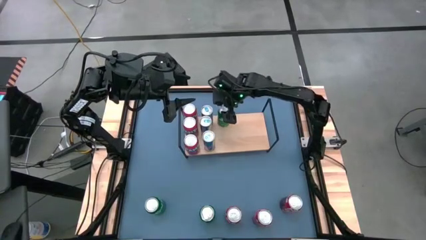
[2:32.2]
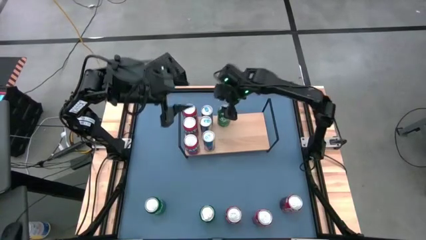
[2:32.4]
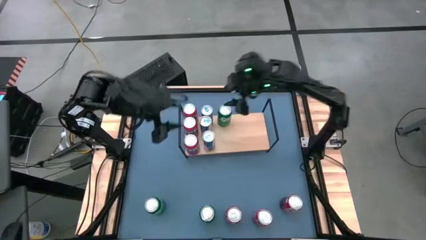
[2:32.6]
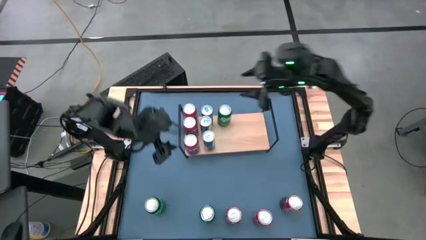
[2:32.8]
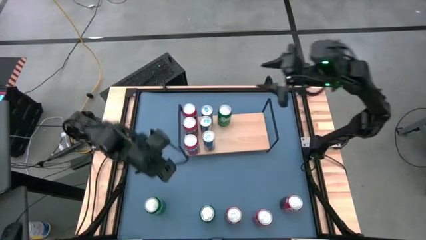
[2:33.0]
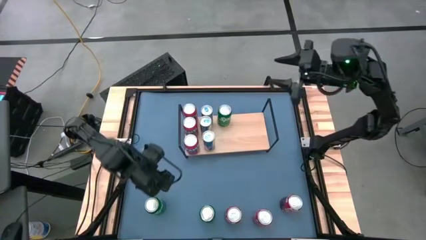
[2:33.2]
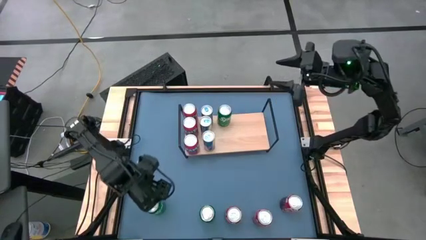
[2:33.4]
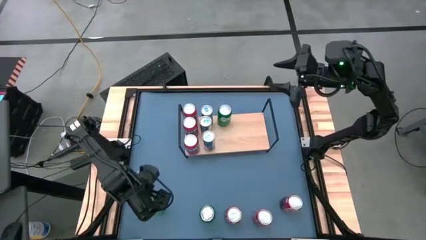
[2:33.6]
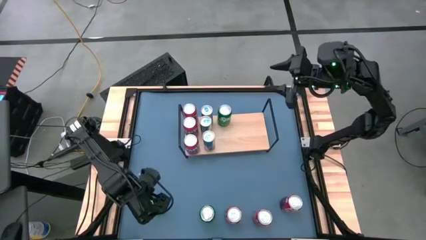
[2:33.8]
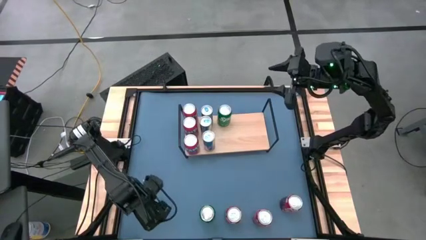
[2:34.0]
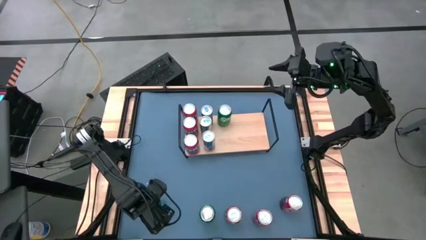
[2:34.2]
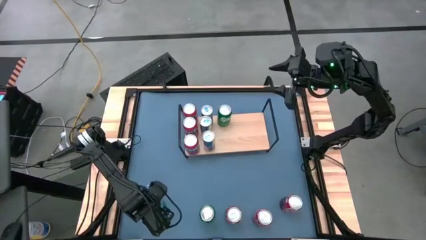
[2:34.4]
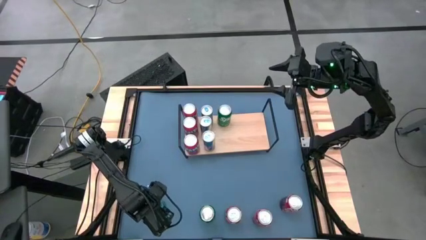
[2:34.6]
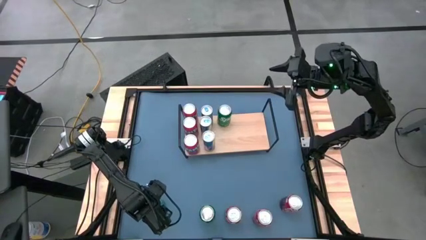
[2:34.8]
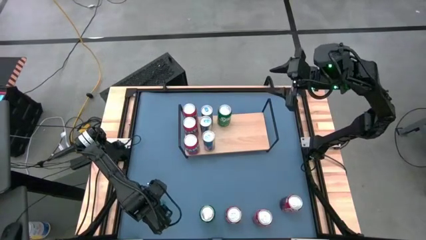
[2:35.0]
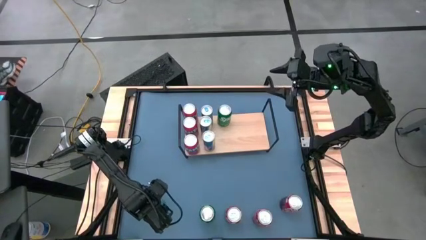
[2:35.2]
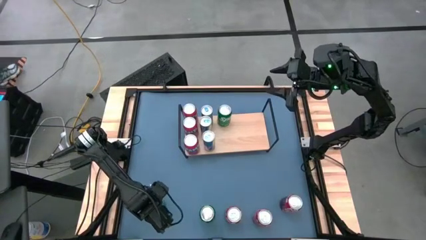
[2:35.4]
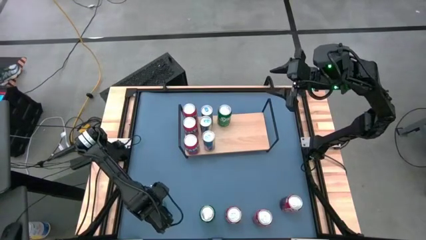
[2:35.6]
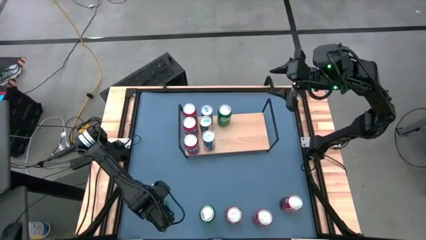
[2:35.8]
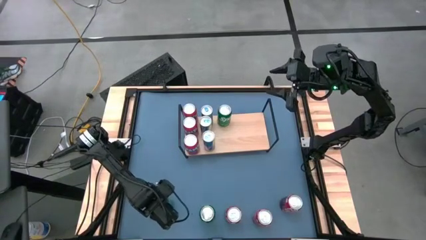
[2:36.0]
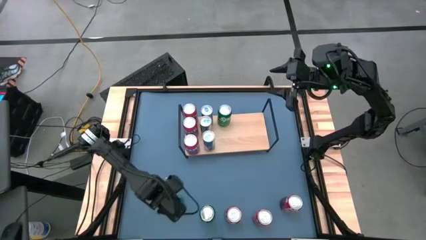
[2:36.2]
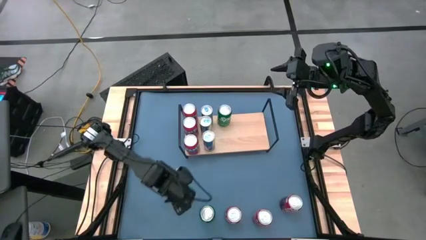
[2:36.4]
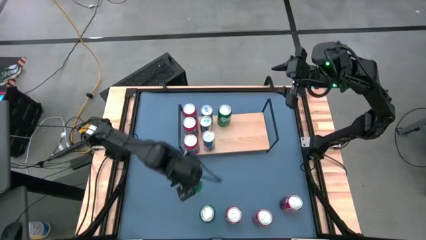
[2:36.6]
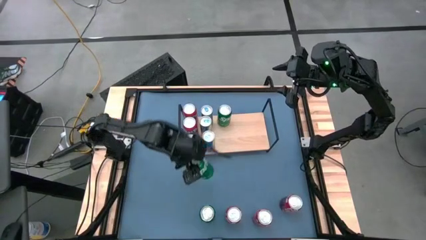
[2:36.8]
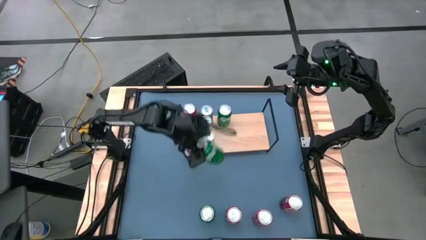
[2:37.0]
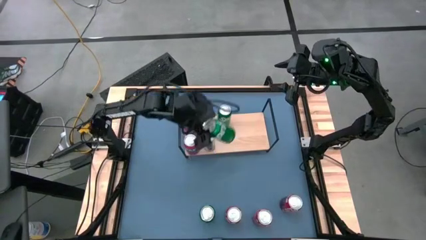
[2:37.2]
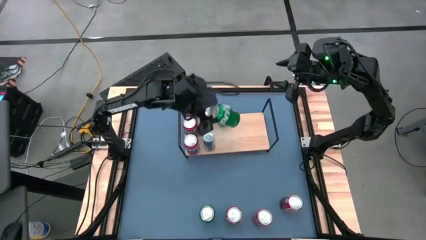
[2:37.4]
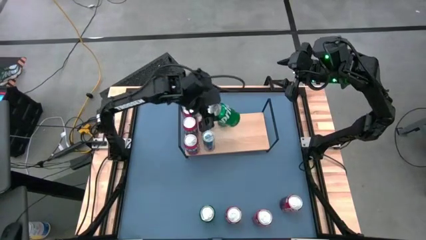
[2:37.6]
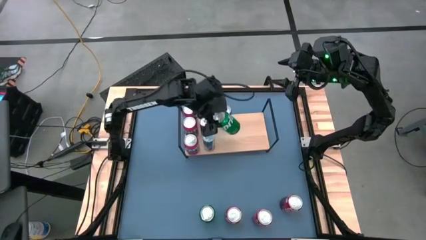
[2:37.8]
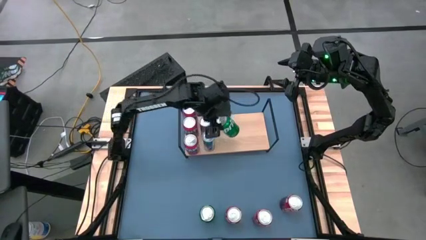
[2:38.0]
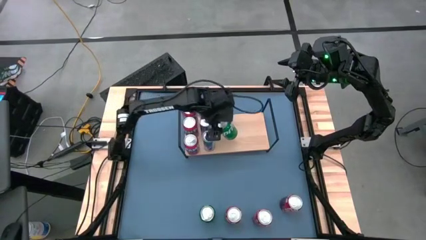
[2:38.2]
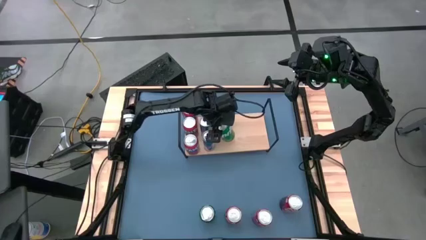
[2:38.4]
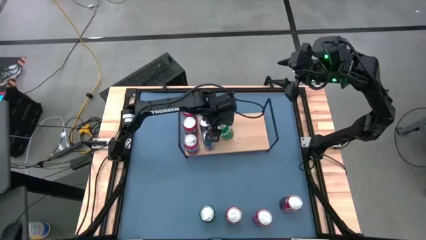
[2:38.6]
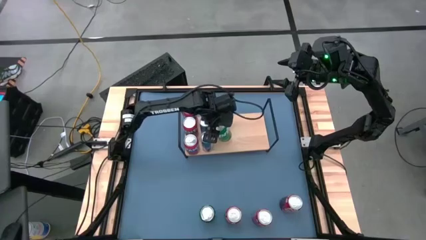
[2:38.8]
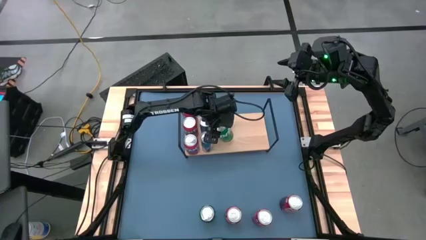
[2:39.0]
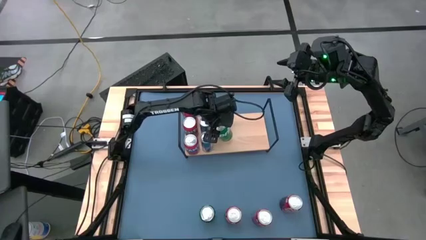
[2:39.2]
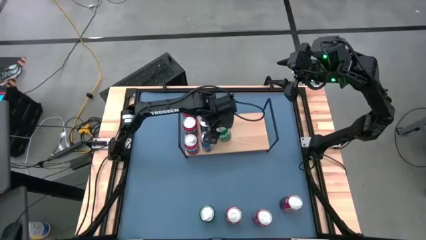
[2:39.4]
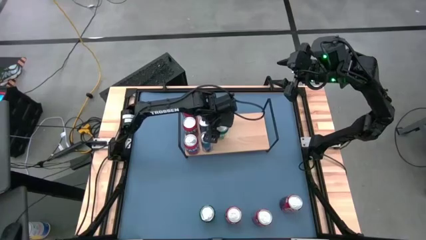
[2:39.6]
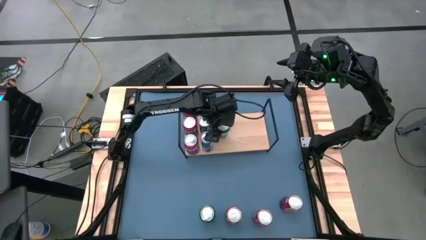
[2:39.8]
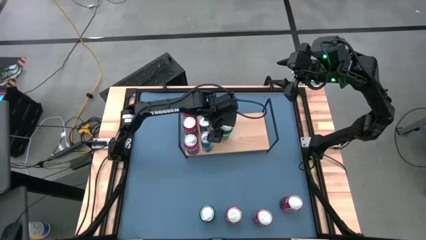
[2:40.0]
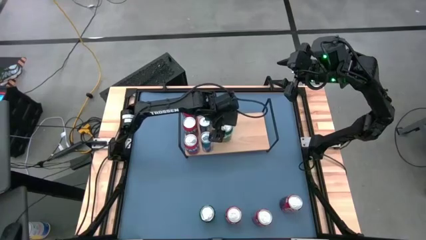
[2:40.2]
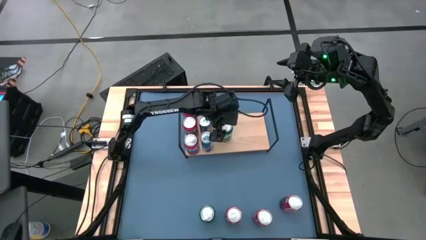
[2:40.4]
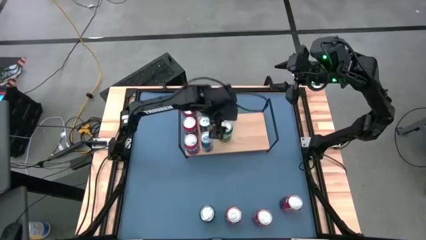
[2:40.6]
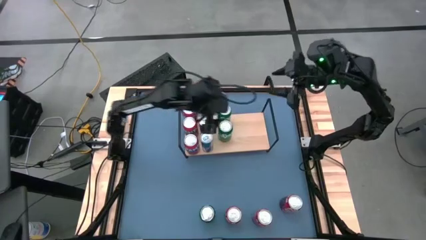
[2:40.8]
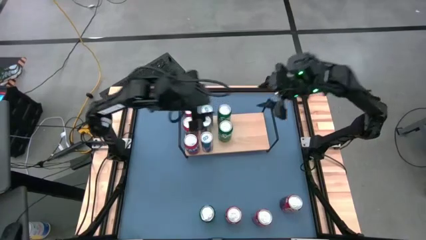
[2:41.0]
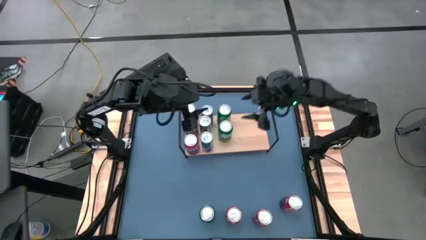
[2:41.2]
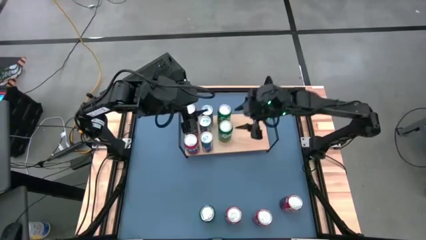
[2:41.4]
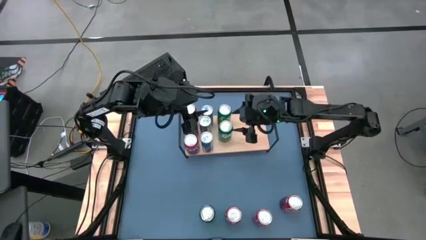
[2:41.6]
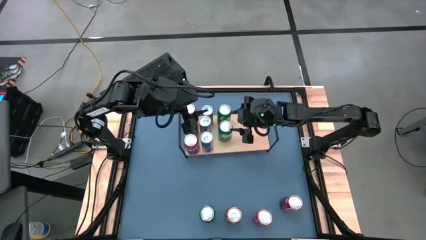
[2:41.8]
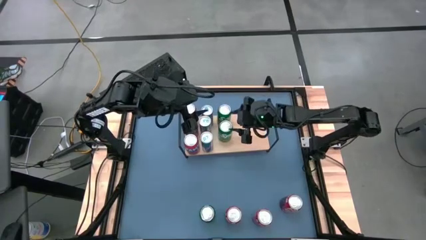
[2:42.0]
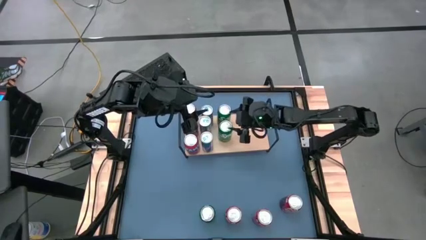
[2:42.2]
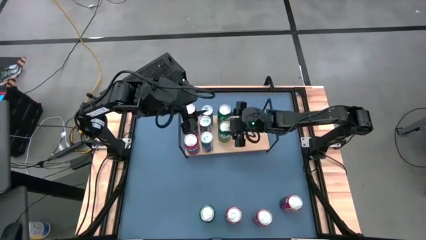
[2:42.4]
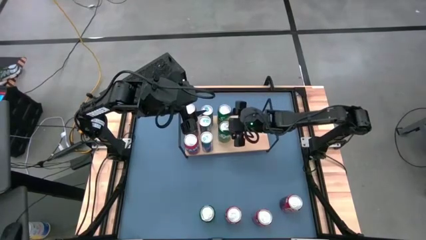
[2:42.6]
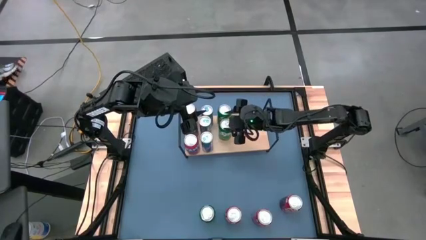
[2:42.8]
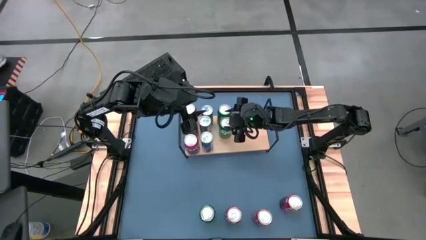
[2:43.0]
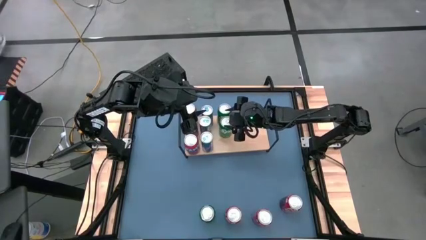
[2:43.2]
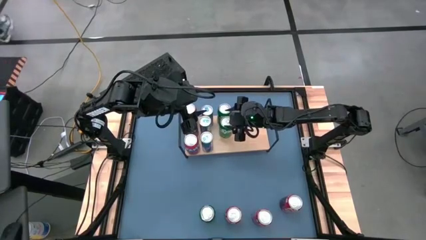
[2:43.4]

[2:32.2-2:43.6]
Task: Place canned beverage on shelf
Put the green soda can on the shelf aligned with other green soda can

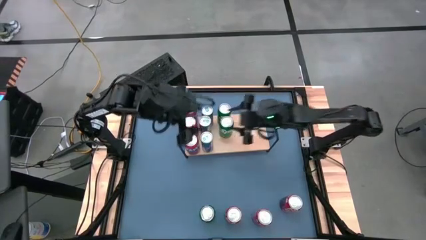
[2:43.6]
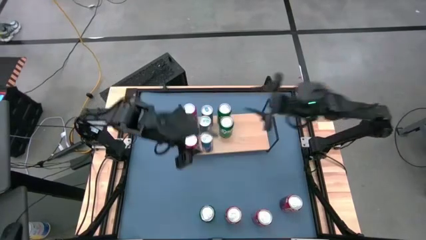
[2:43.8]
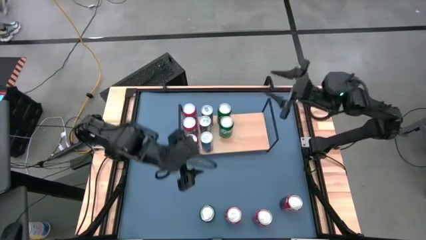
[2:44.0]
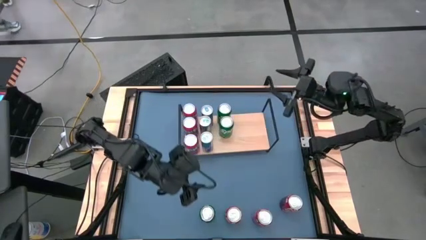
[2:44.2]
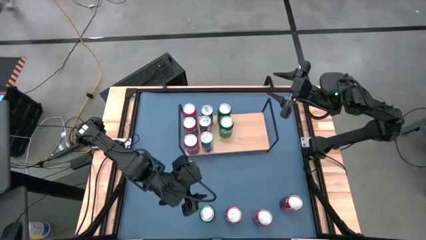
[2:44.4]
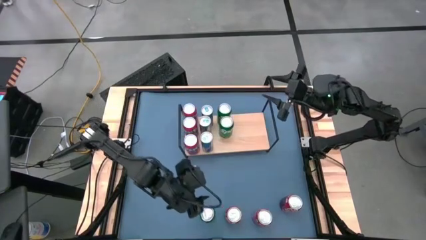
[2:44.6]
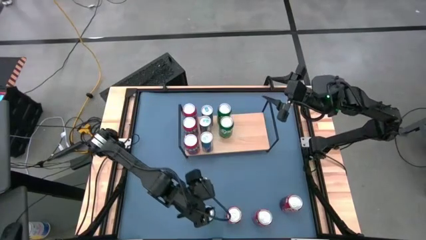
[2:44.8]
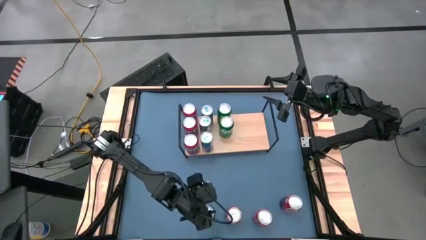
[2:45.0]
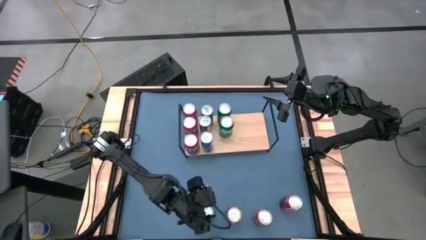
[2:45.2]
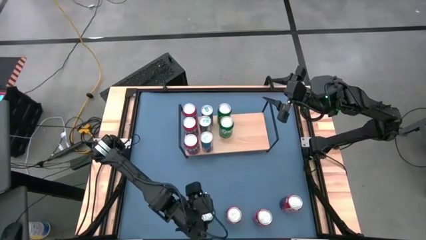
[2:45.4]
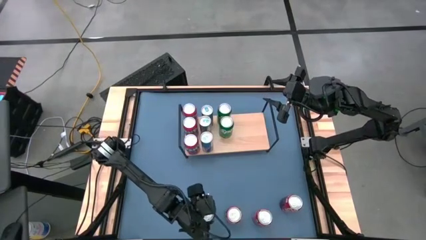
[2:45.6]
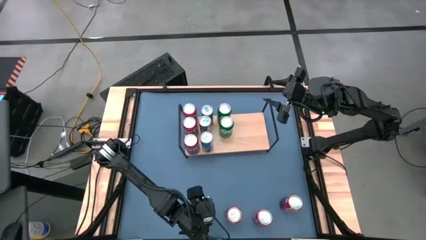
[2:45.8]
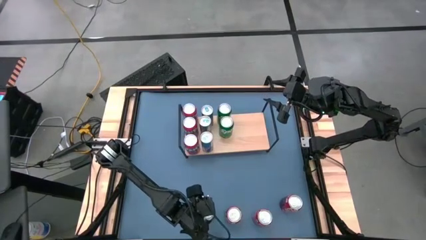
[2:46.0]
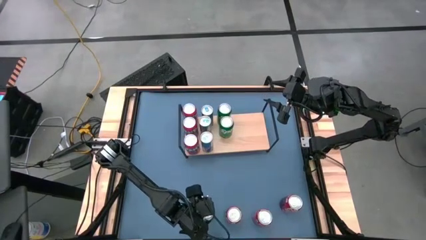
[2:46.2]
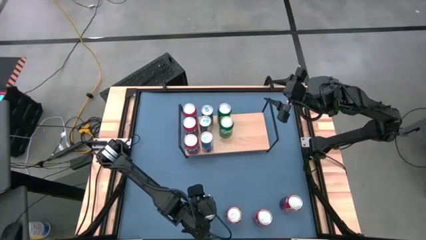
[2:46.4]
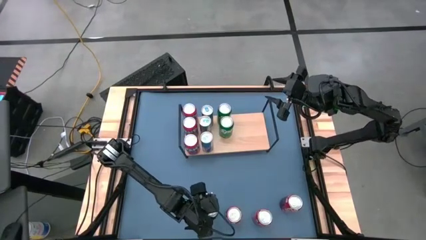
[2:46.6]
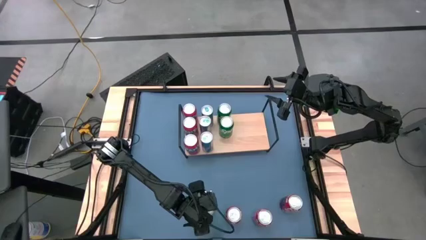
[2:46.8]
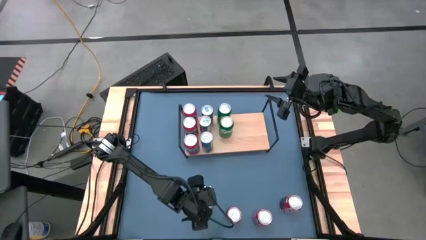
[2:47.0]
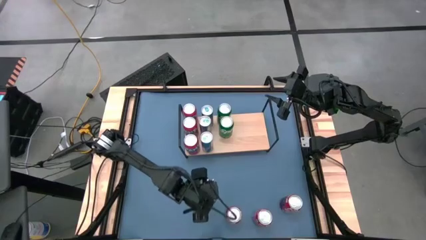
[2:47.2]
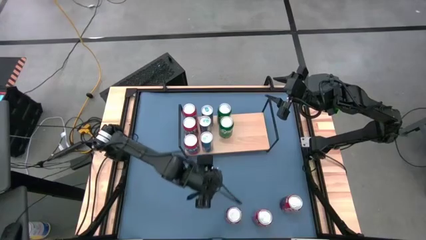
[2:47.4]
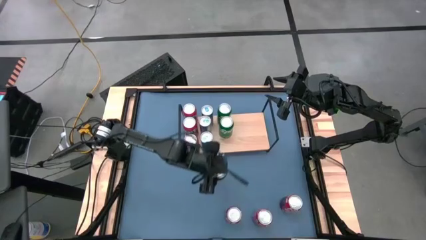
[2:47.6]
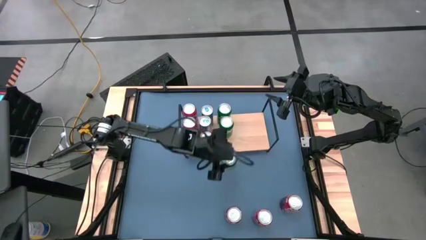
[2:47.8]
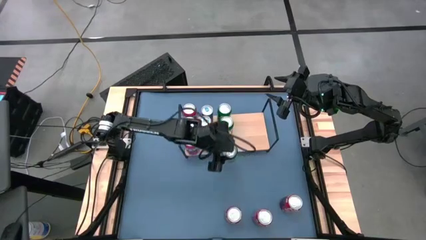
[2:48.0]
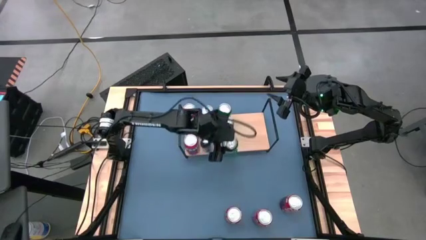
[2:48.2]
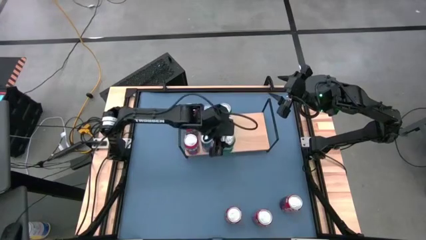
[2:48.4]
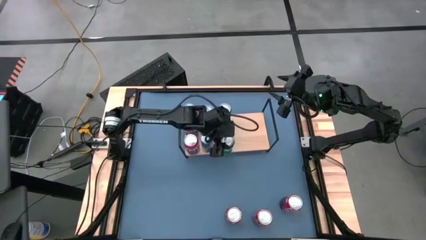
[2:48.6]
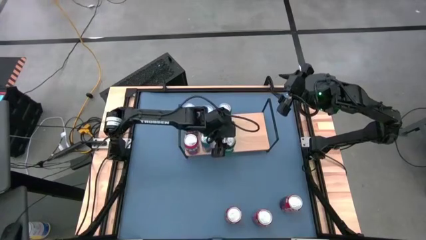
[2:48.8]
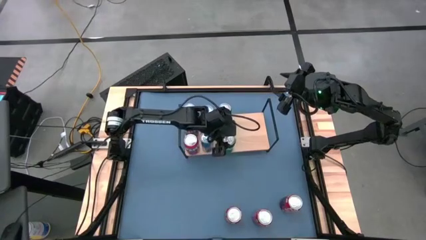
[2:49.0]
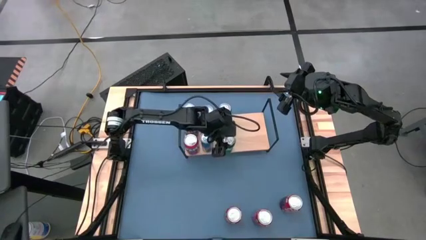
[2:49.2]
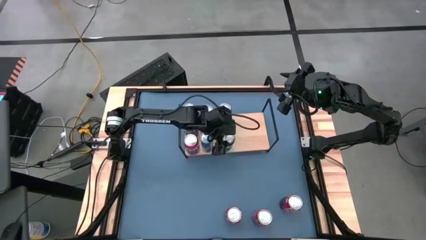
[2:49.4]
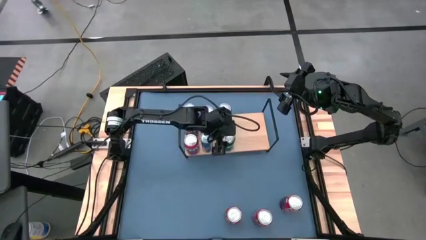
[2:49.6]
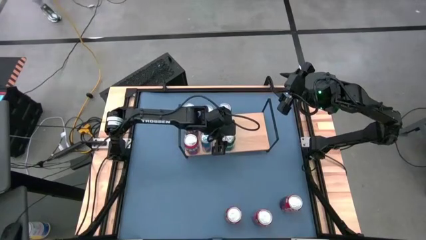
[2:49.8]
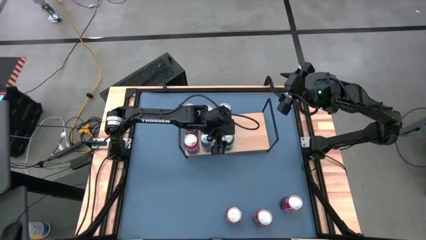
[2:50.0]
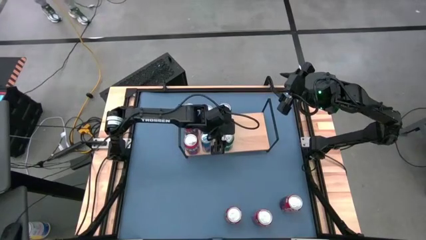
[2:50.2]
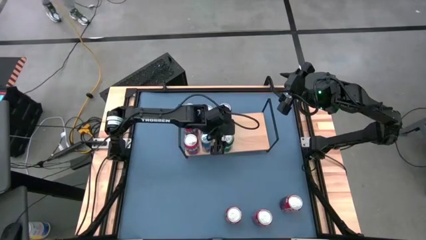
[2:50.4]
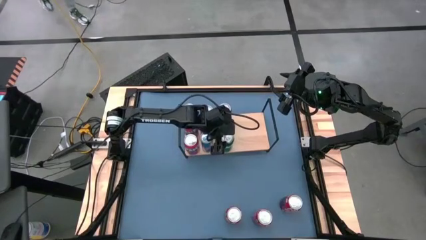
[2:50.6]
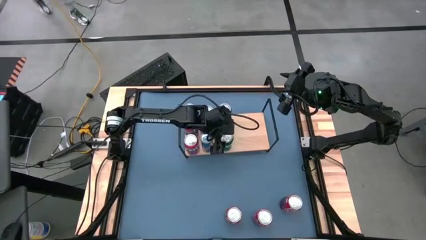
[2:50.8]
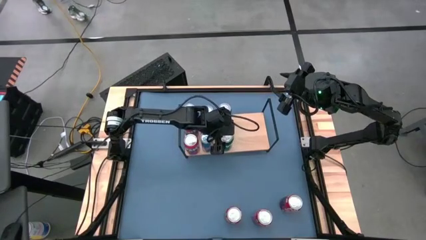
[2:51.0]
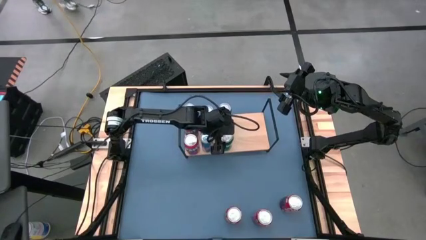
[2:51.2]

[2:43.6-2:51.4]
Put the green soda can on the shelf aligned with other green soda cans
